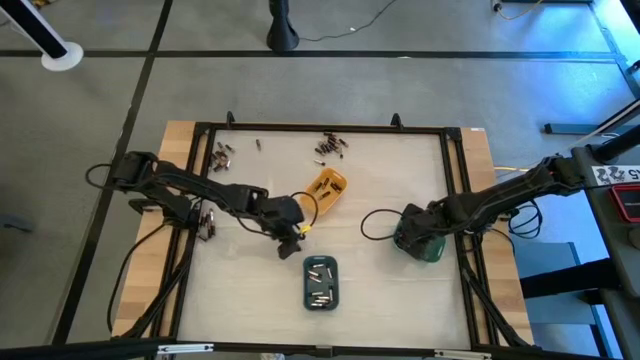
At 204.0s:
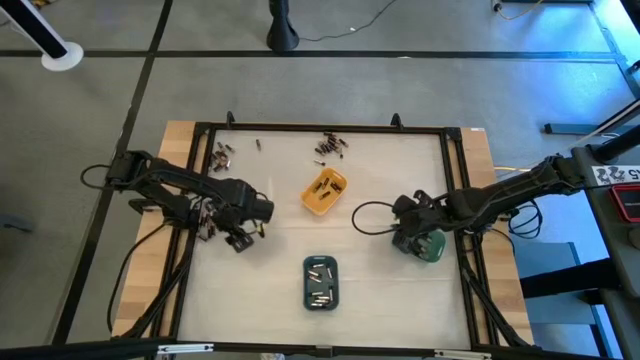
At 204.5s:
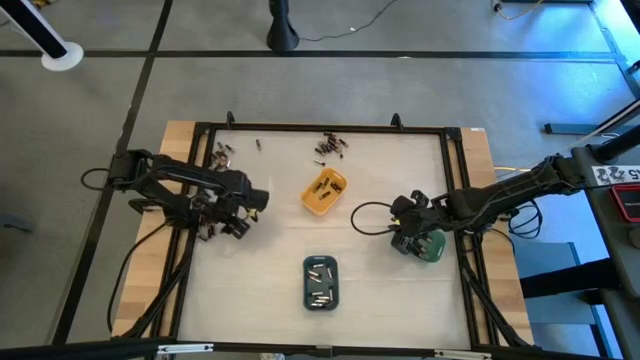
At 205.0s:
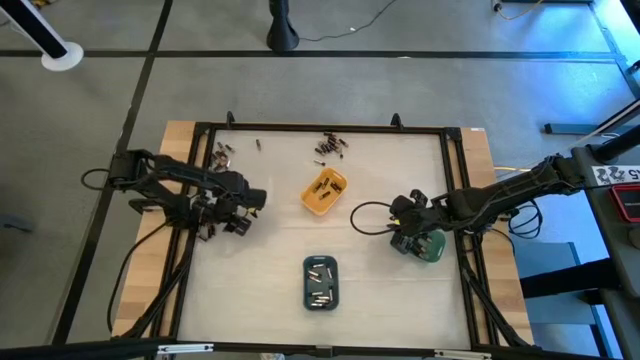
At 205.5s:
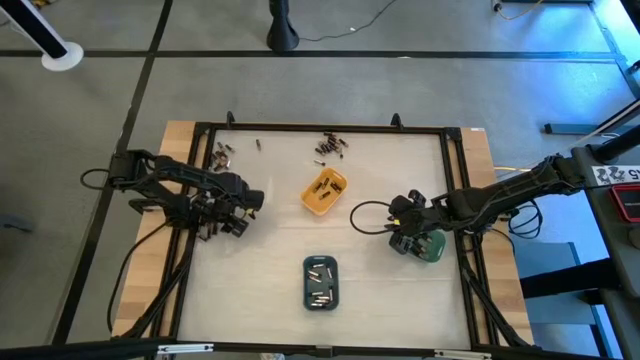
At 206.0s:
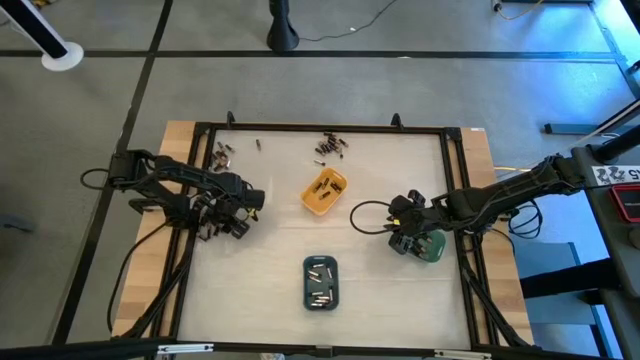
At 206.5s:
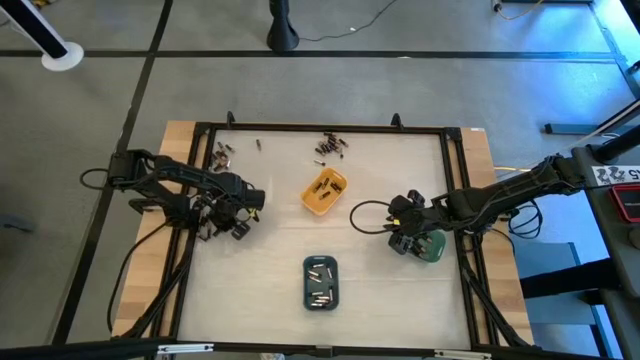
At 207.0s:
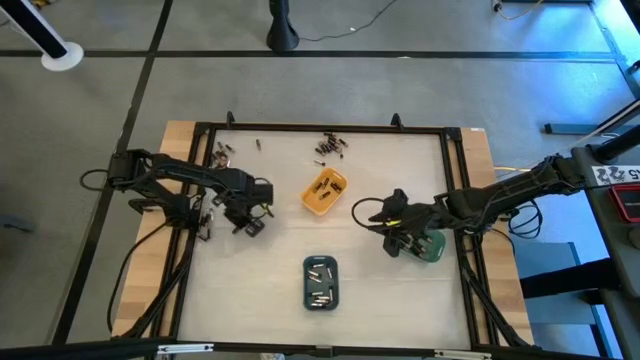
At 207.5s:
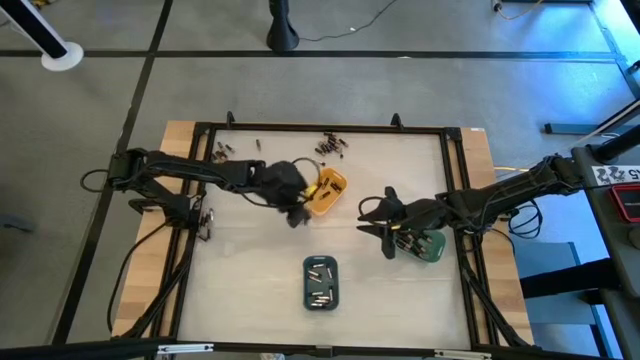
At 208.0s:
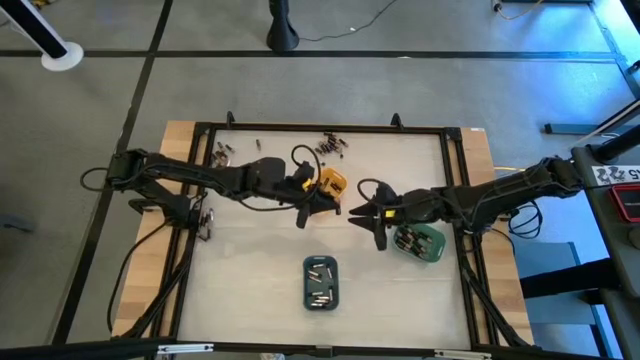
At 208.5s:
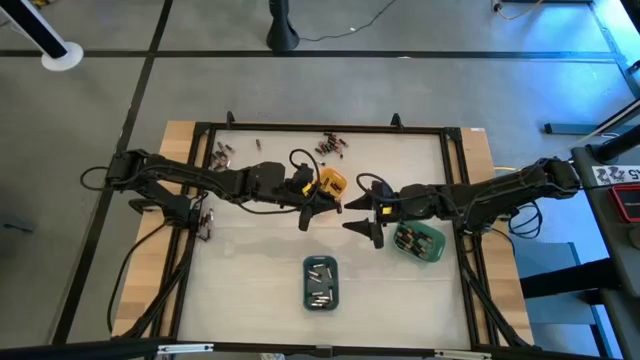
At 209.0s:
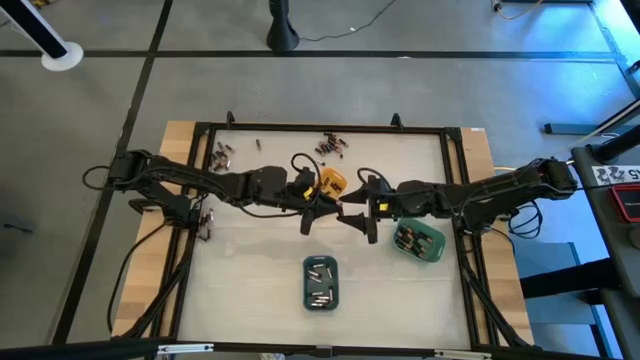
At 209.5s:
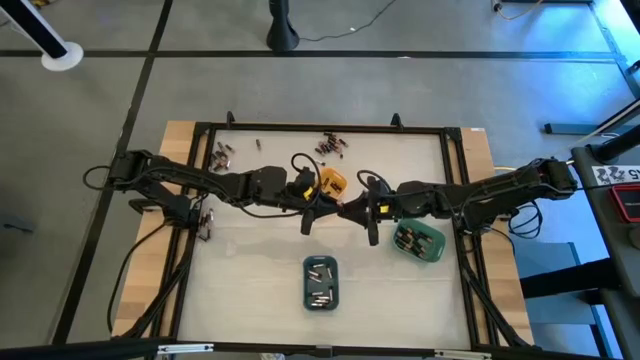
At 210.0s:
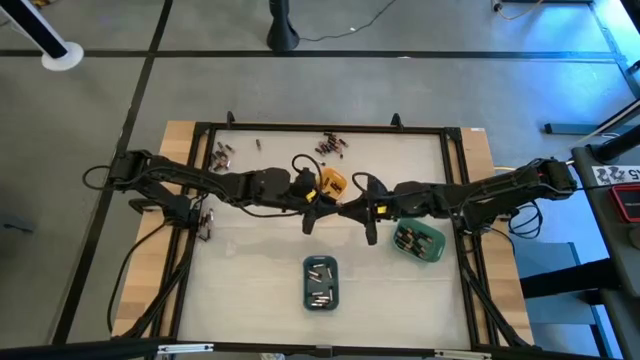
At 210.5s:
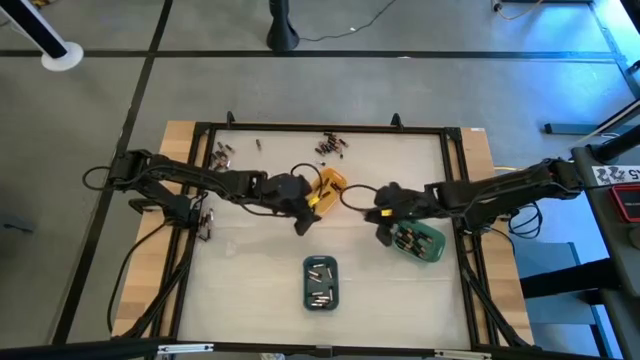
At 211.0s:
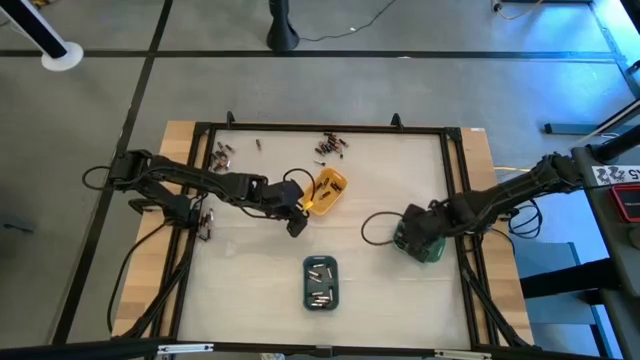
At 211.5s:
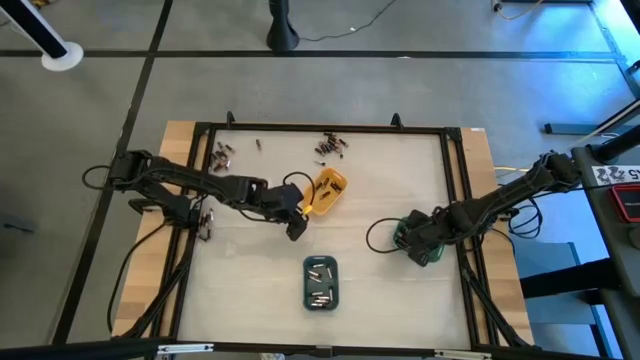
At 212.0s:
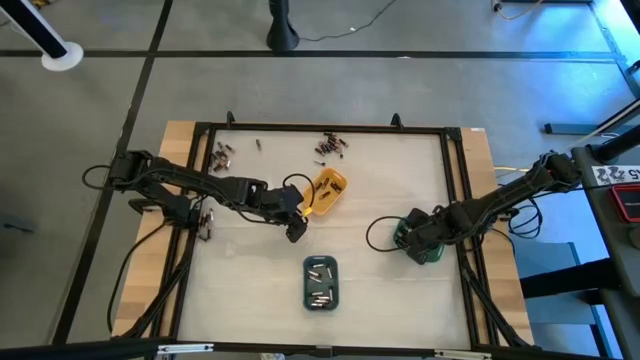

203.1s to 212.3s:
Task: Sort batteries
Put the black battery into the green bin

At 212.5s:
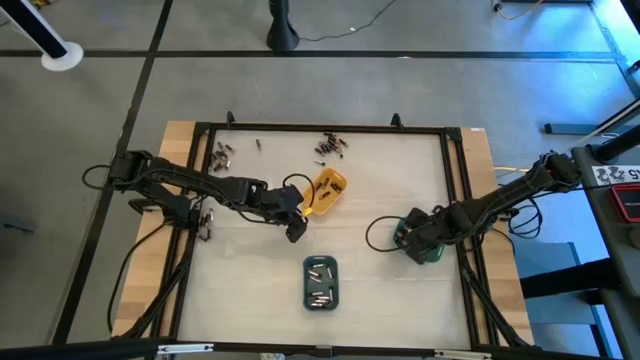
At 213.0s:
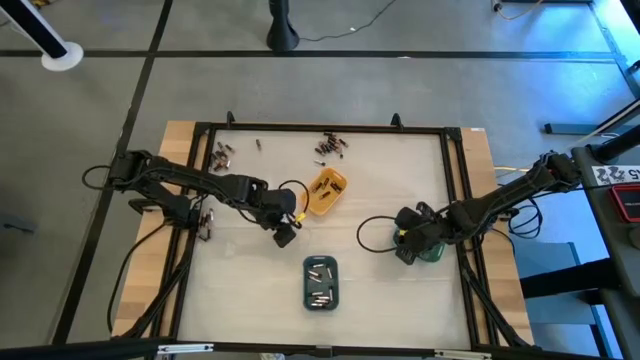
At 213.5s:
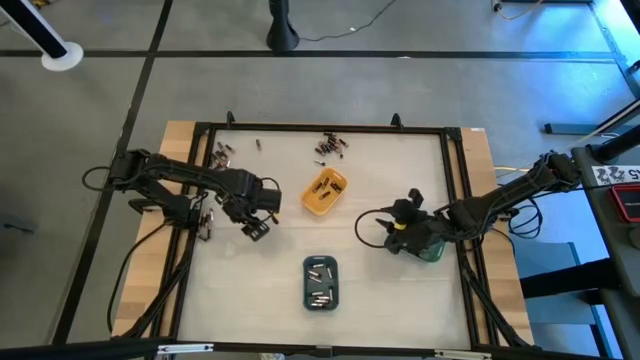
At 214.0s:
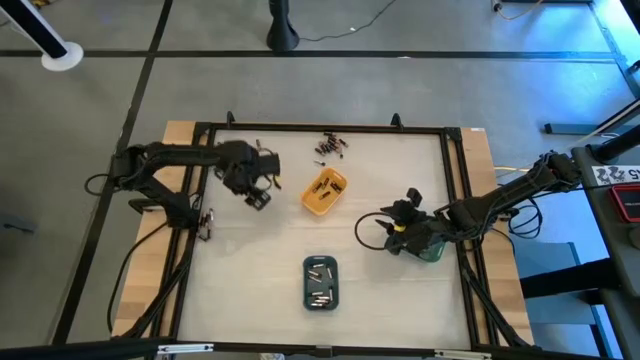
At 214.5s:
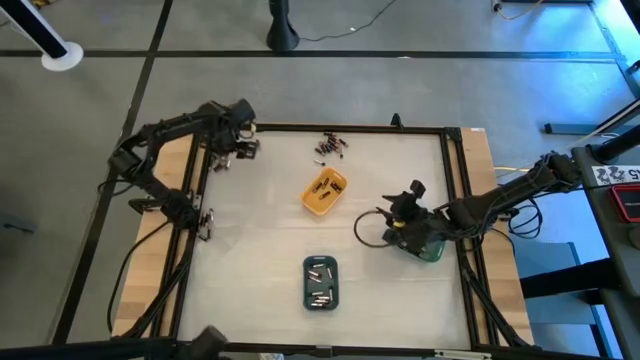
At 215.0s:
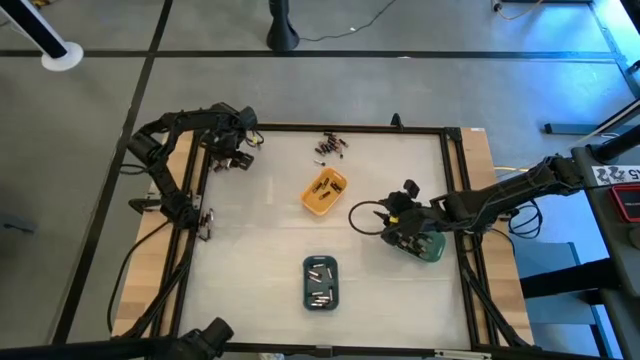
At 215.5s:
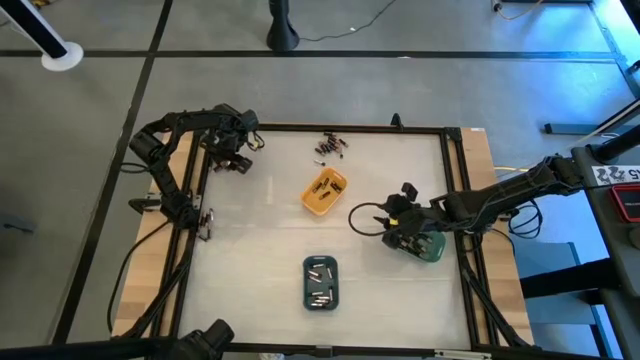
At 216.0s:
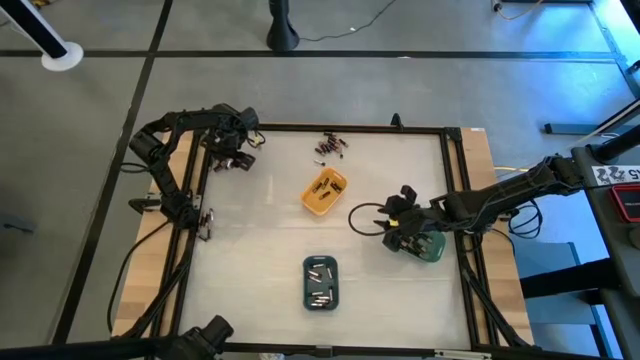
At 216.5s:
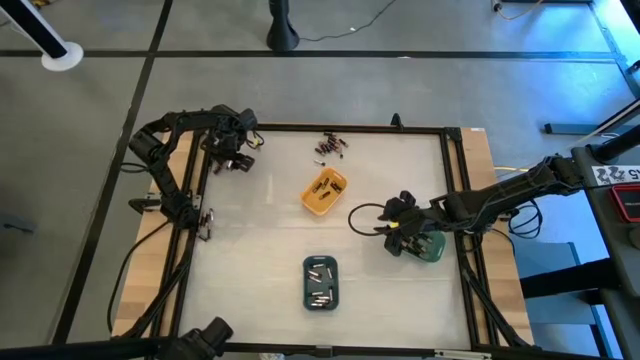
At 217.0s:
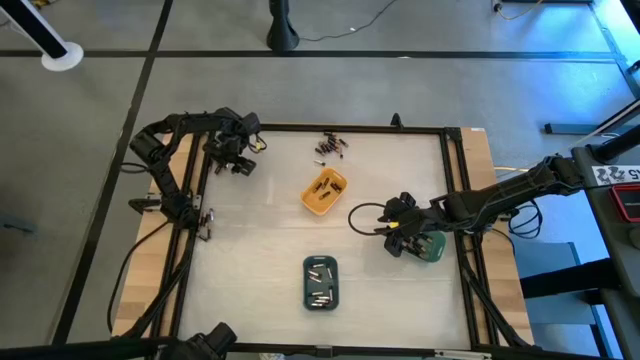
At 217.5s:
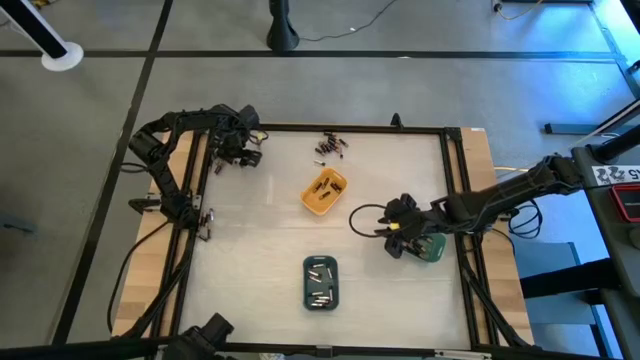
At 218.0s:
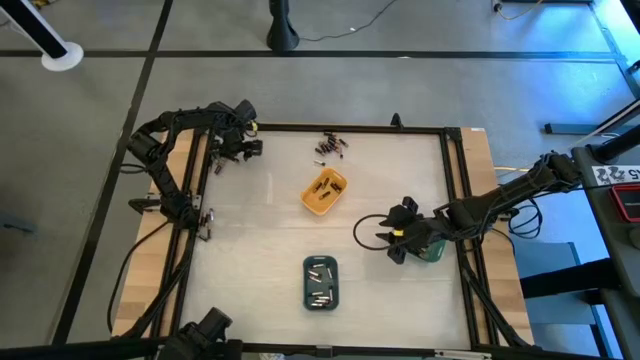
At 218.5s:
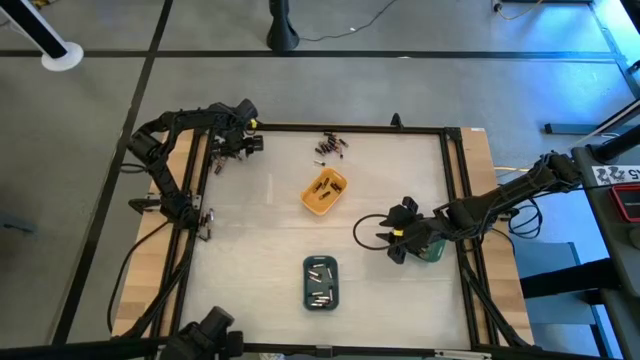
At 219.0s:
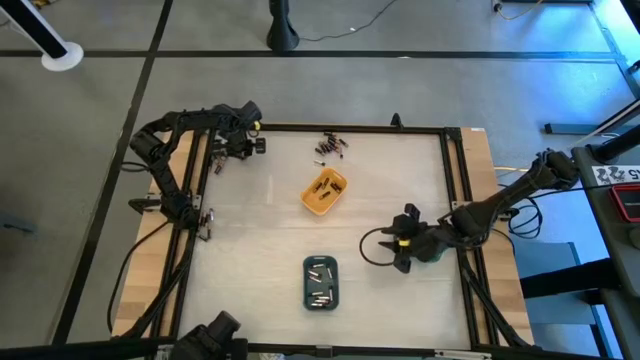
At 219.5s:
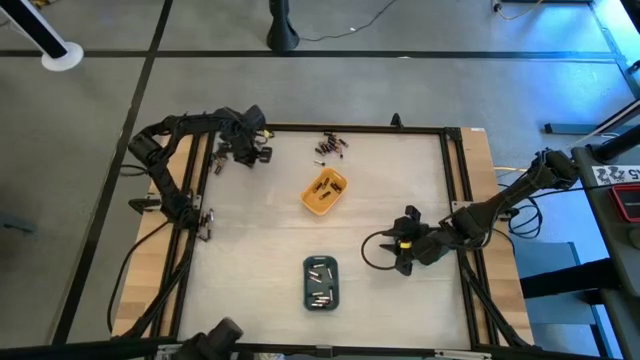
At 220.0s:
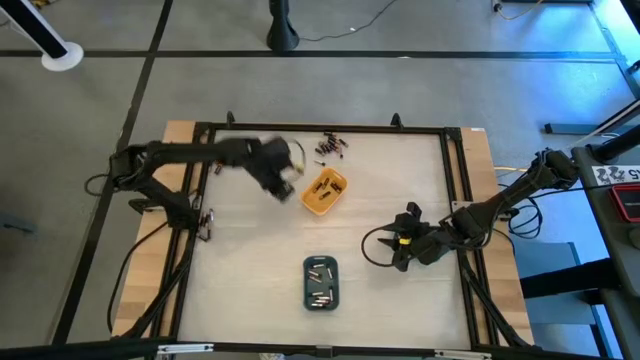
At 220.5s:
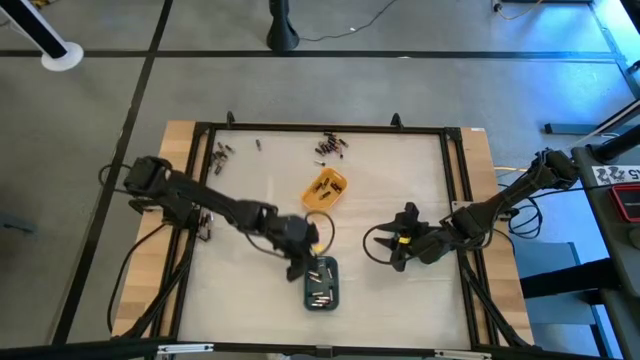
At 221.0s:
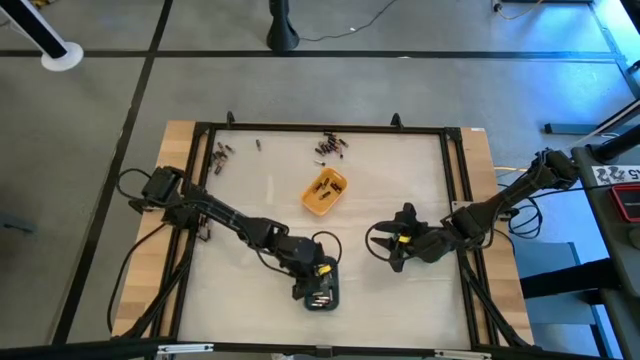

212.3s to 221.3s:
Put the silver battery into the blue bin

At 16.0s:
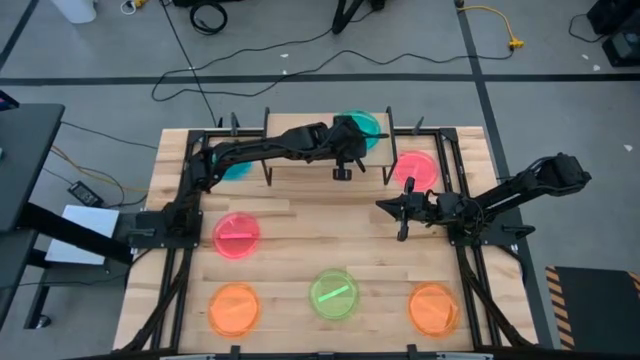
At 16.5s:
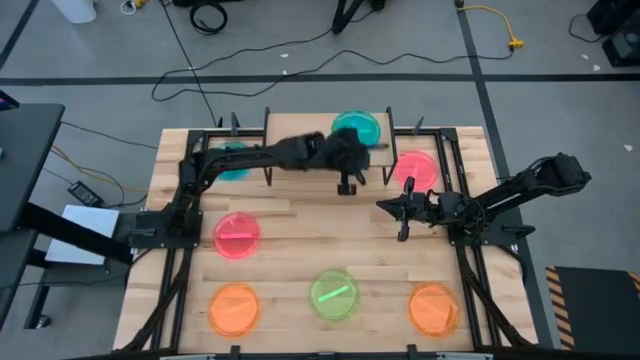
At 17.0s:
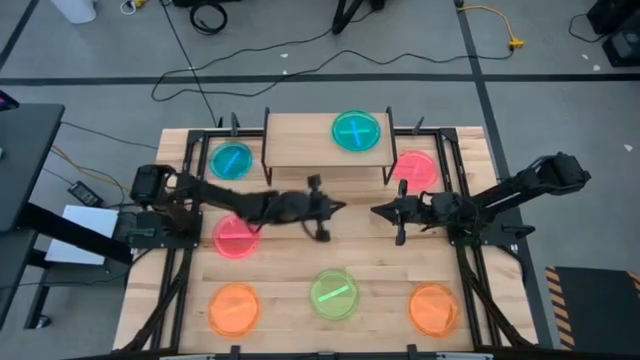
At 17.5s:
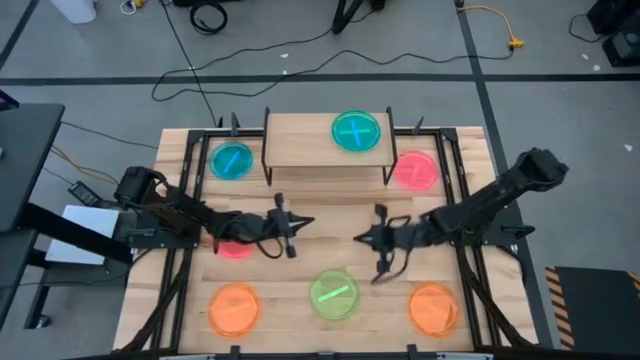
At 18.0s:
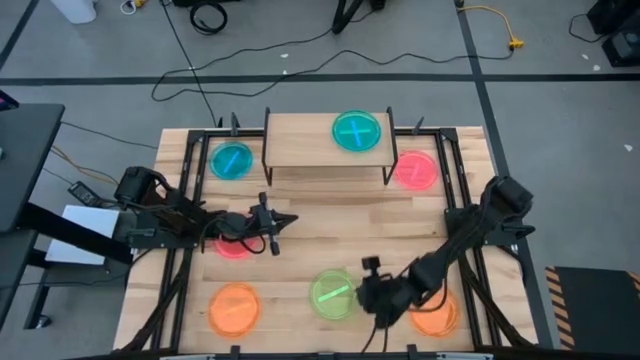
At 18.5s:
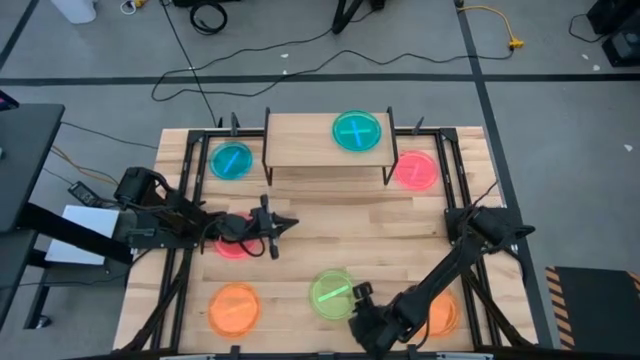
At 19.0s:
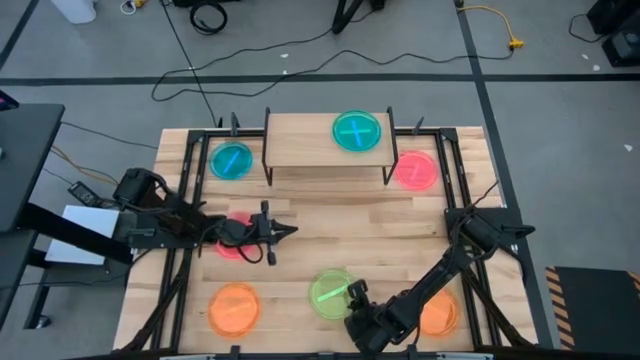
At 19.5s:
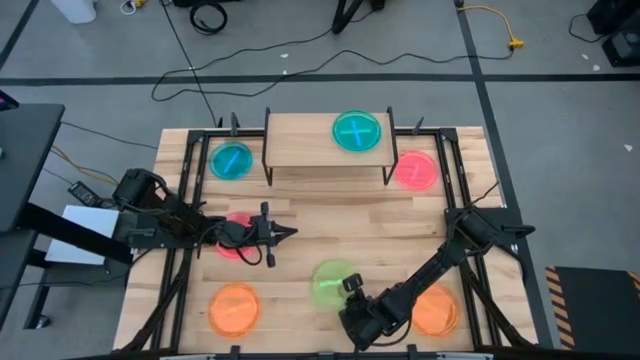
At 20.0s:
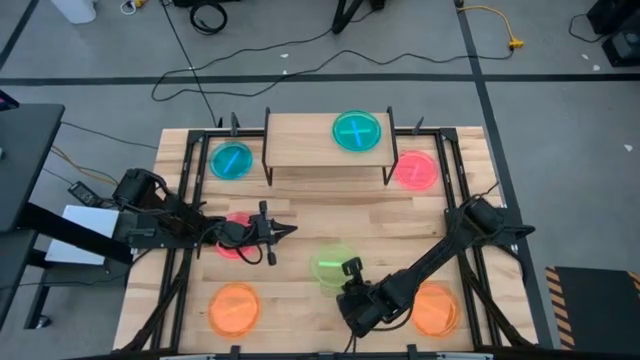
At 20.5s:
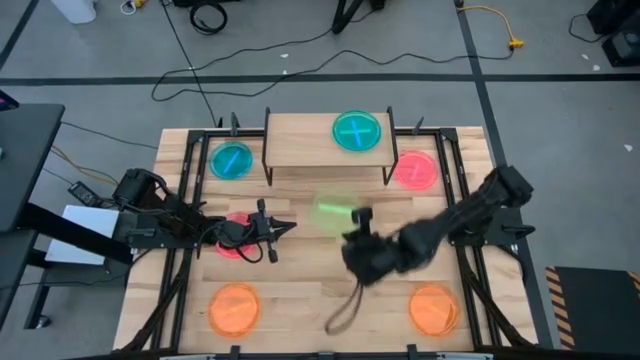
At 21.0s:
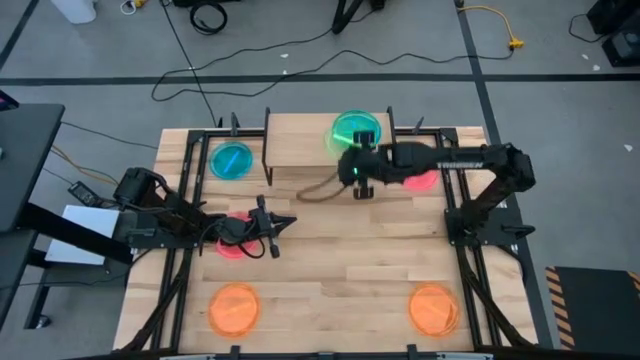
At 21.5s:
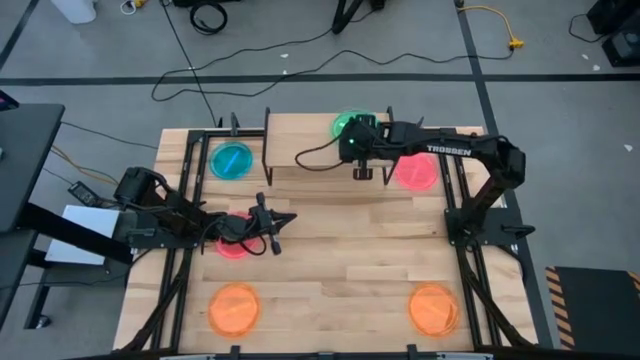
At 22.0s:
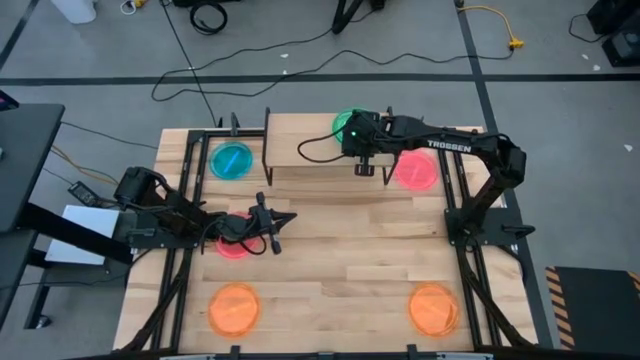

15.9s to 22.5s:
Task: Place and stack plates onto a shelf
Stack the green plate on top of the blue plate on the shelf
